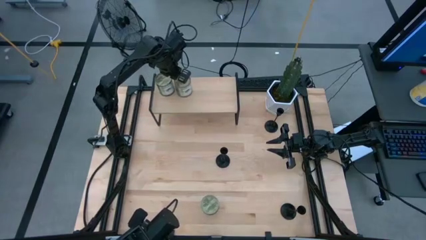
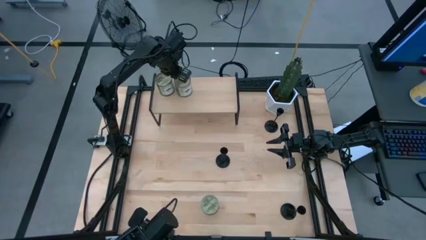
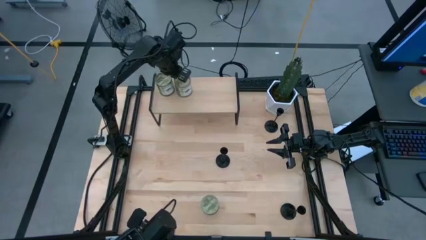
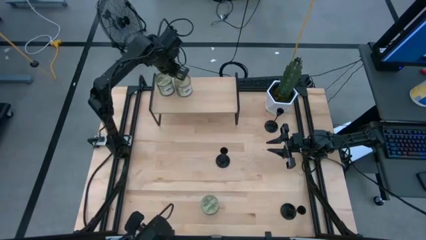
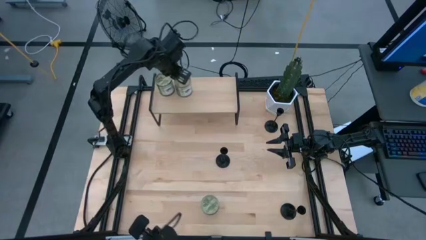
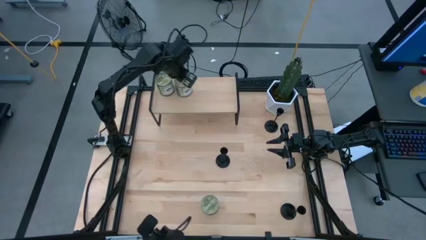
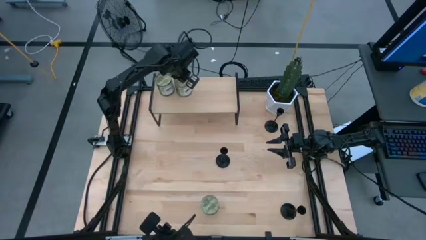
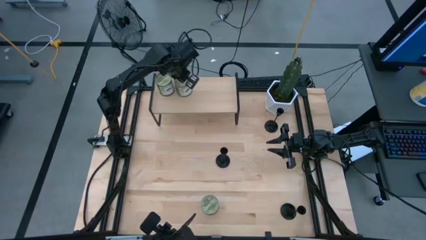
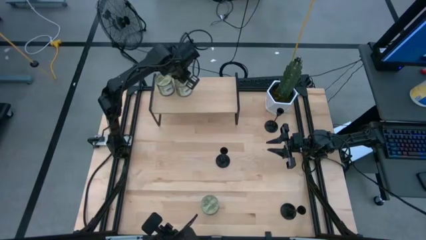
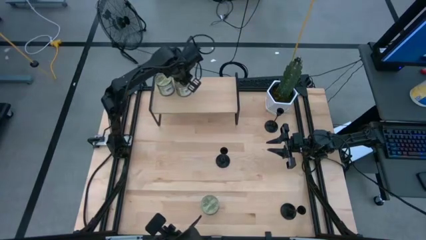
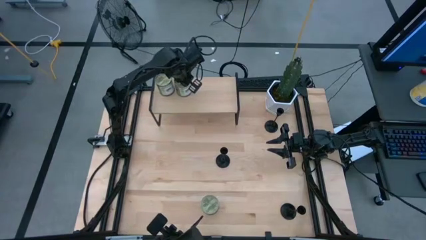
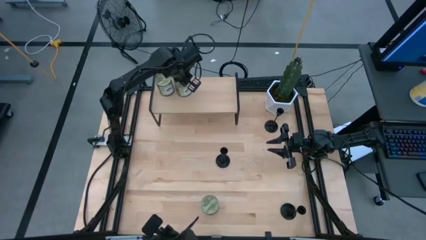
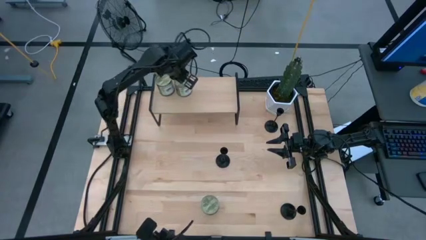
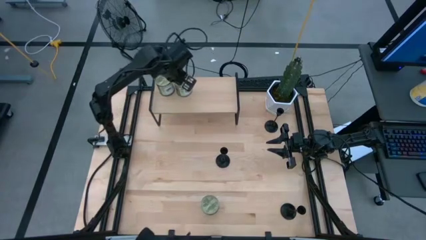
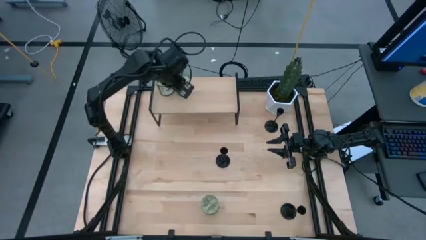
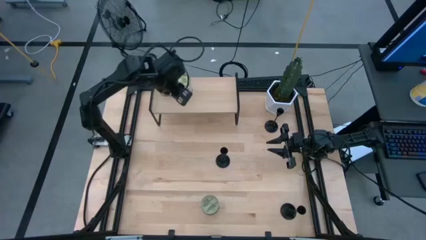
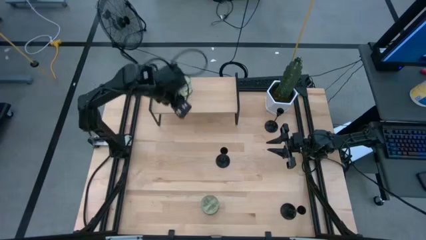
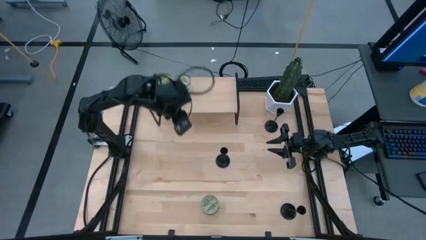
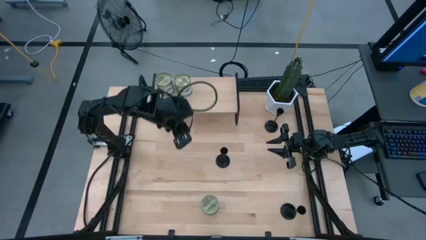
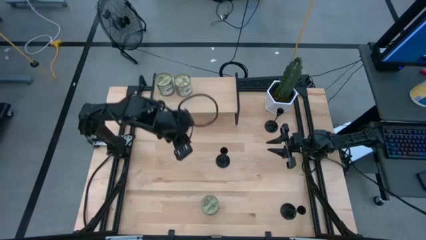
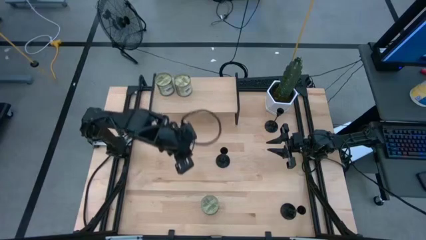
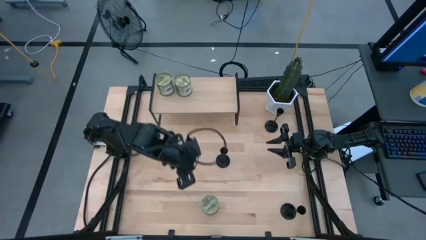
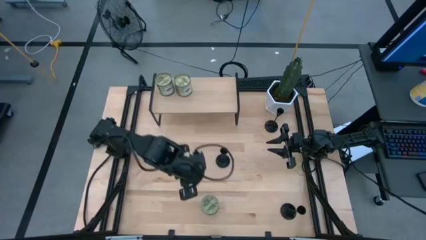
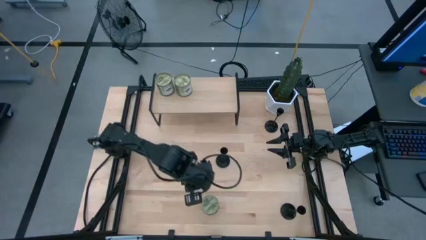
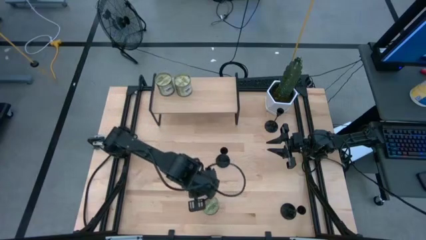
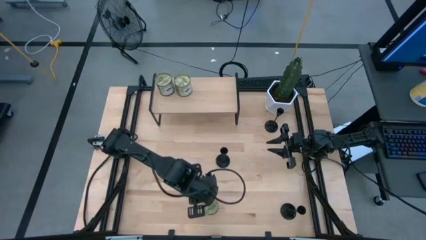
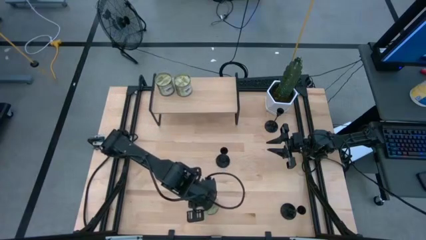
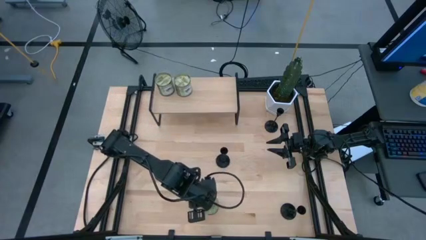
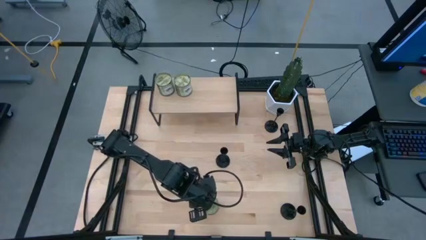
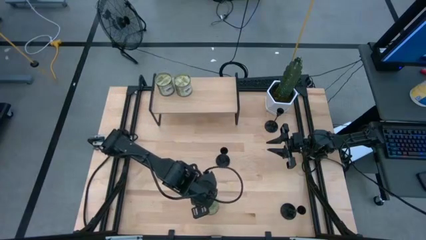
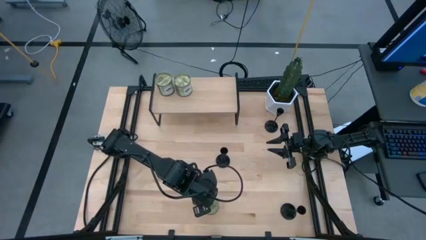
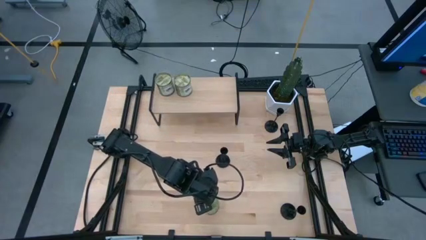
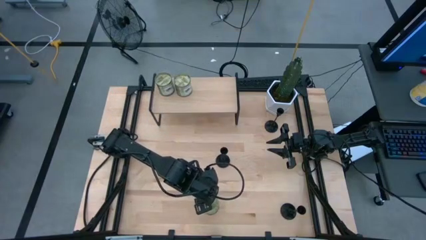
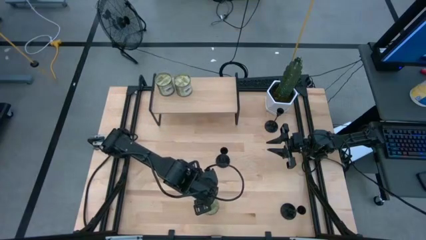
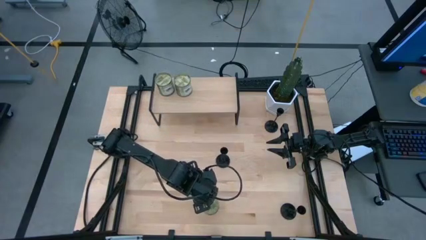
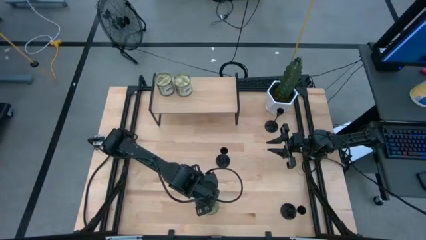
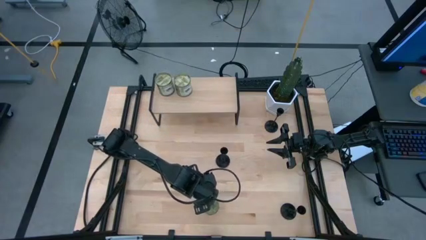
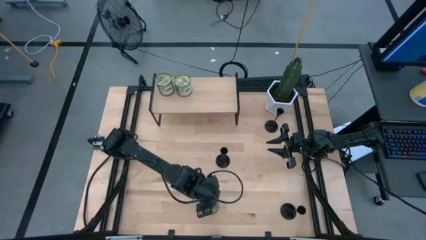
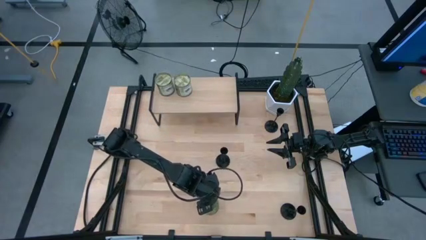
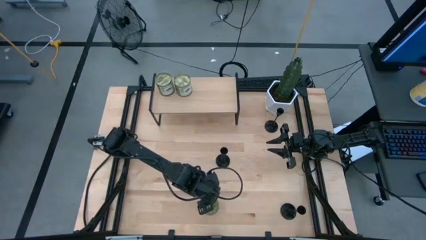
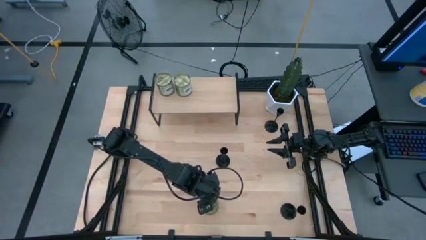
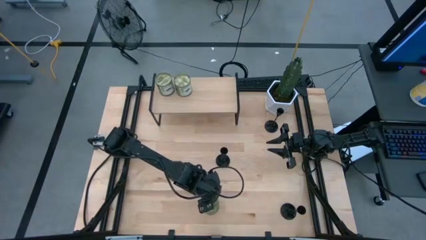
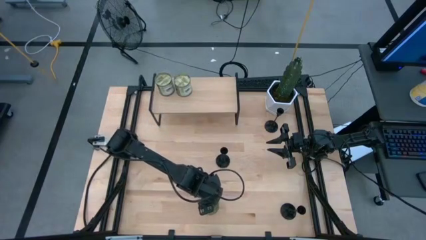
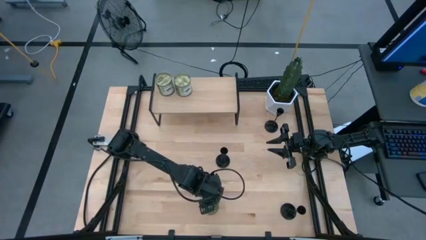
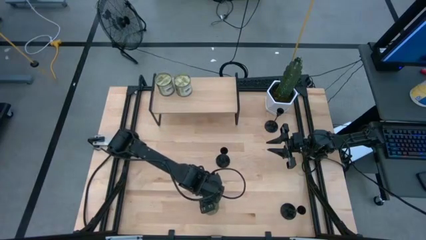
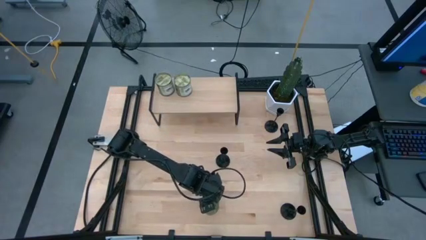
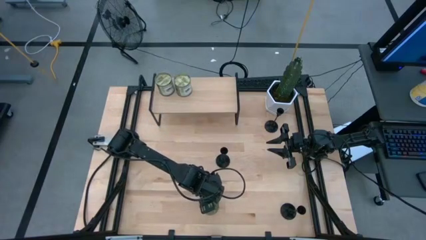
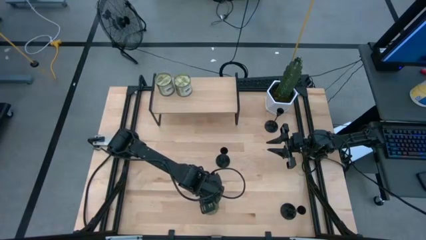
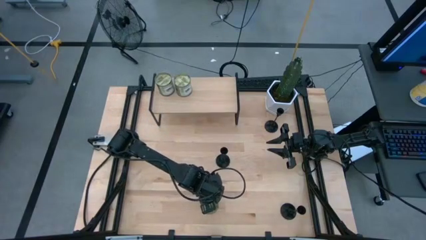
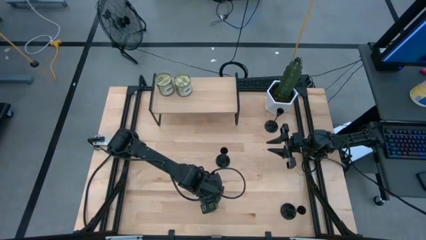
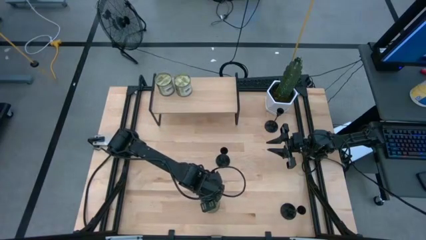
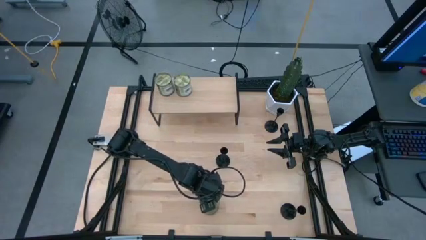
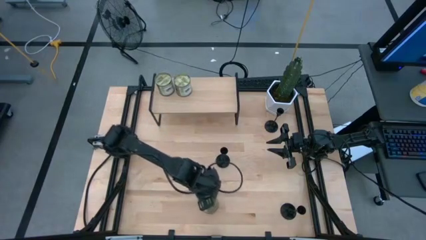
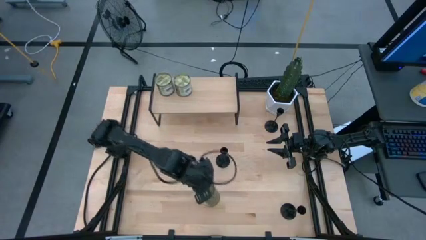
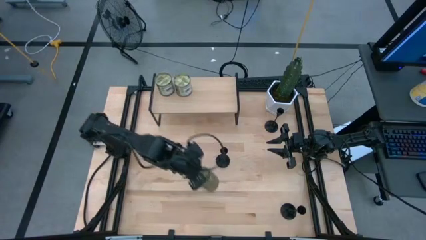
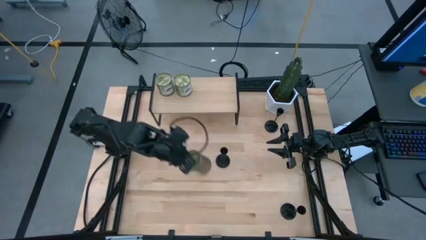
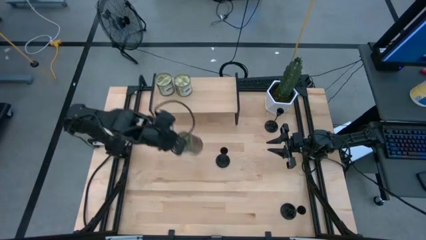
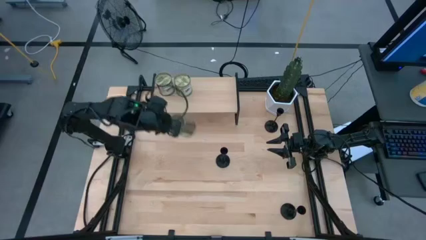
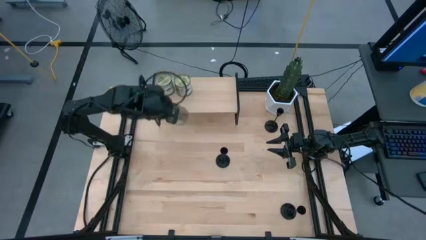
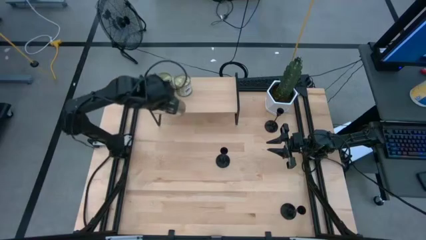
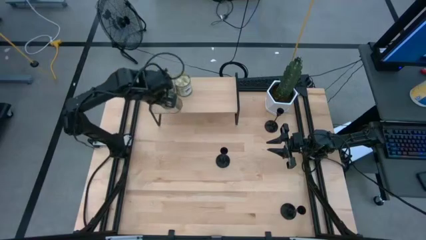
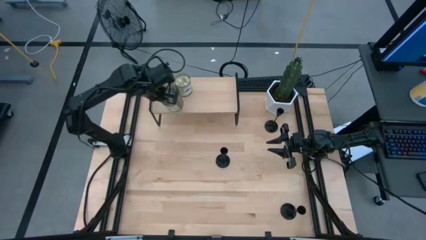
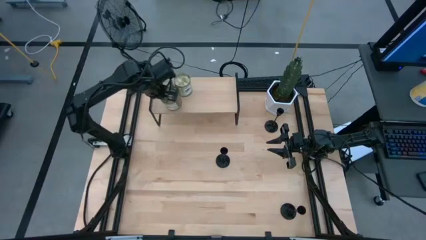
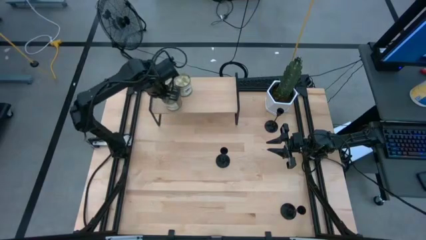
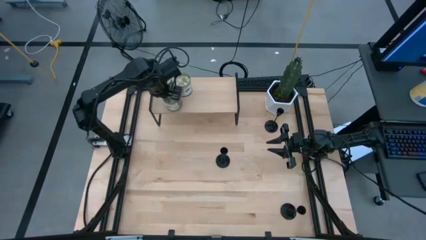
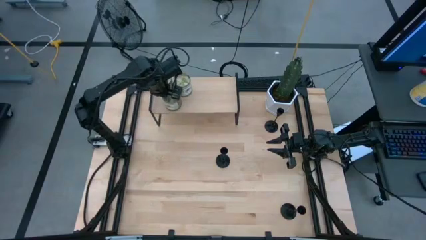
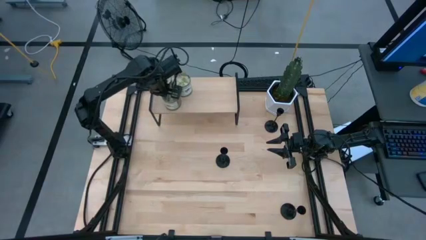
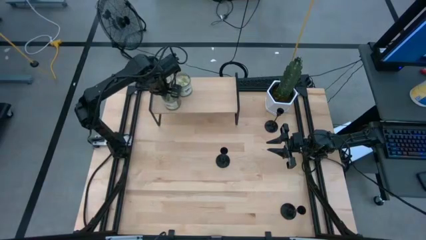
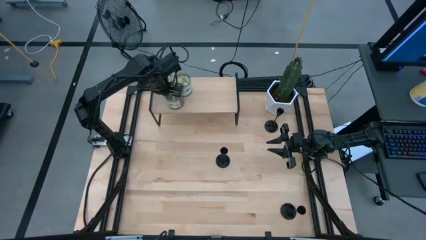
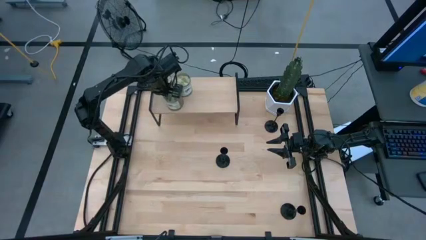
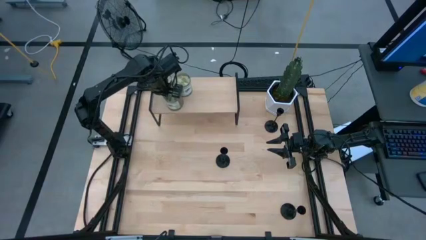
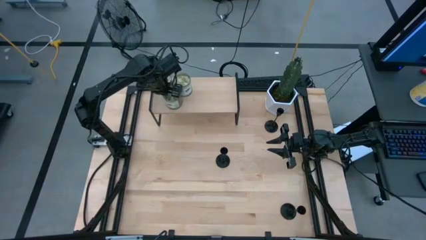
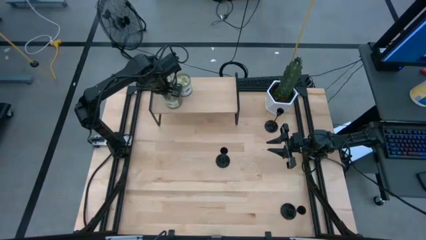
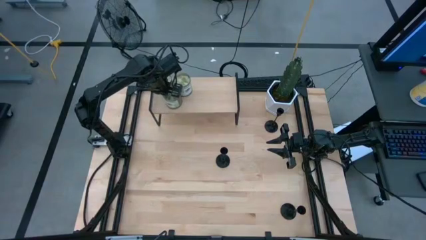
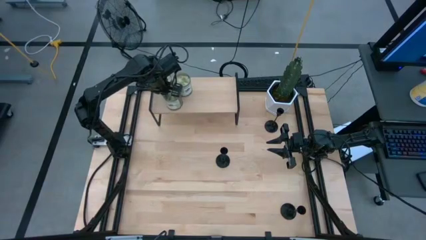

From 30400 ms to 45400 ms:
Task: Pick & Place candle stick holders
Put the green scented candle on the shelf
